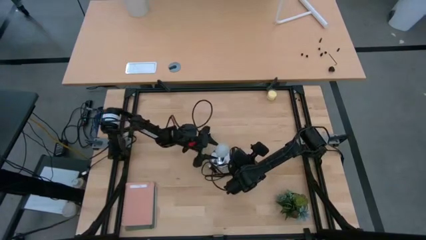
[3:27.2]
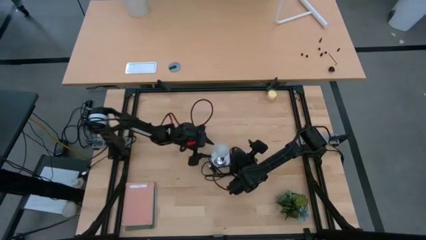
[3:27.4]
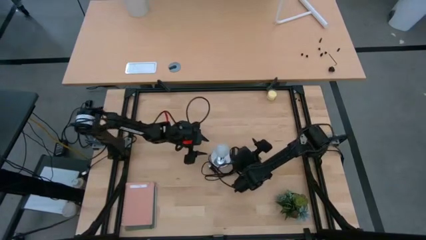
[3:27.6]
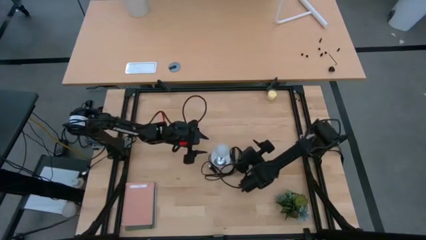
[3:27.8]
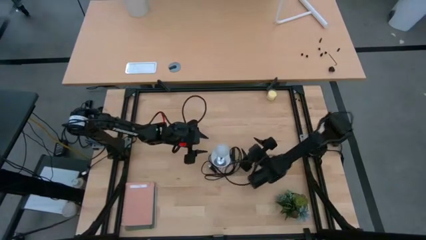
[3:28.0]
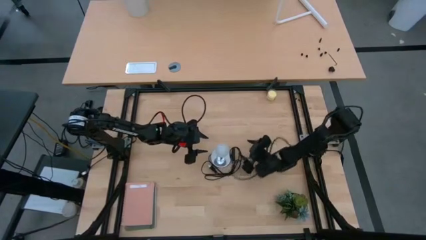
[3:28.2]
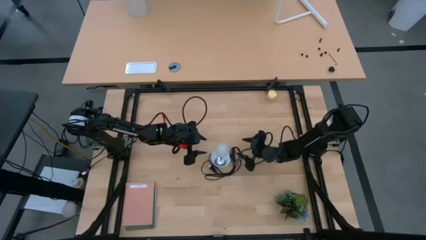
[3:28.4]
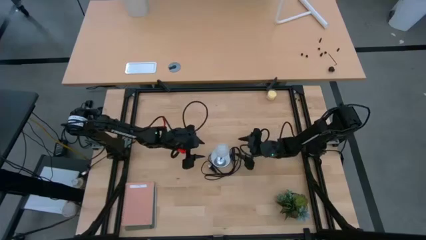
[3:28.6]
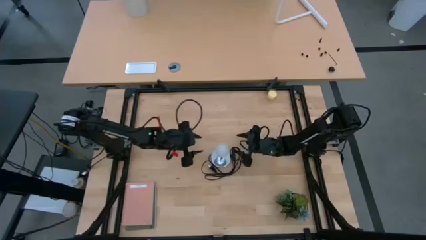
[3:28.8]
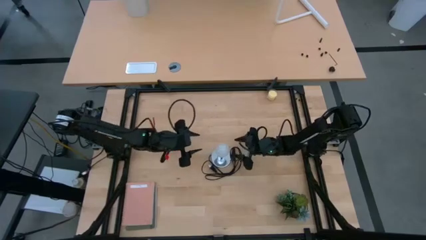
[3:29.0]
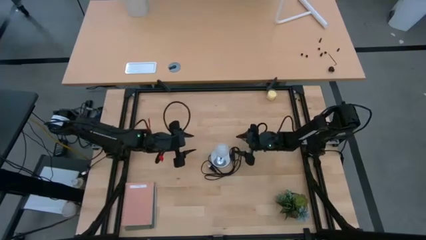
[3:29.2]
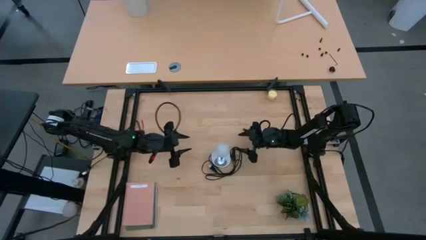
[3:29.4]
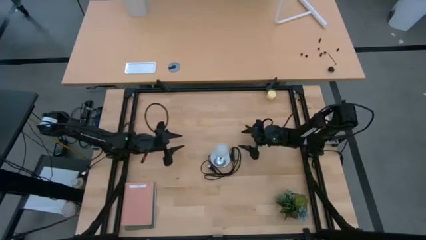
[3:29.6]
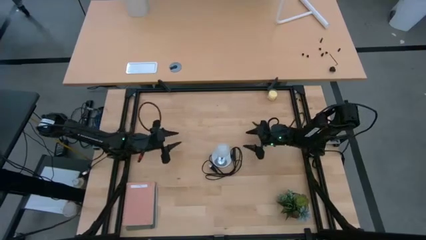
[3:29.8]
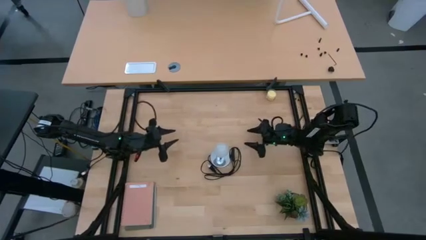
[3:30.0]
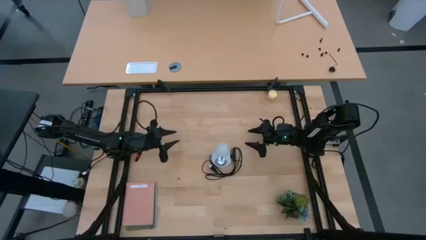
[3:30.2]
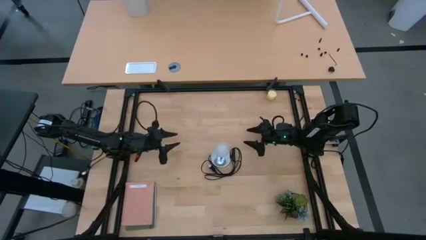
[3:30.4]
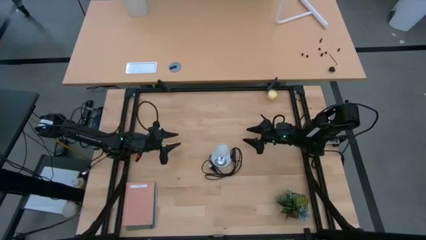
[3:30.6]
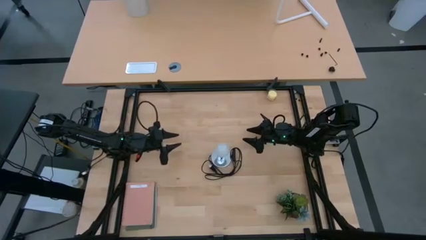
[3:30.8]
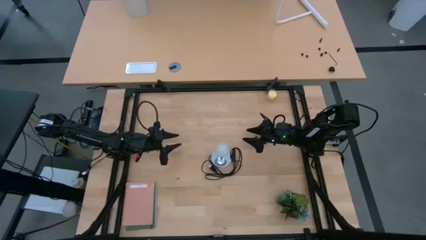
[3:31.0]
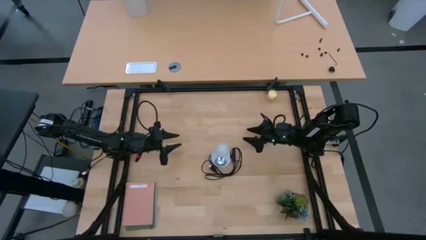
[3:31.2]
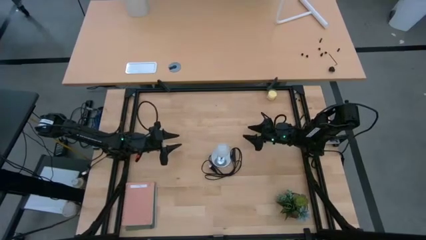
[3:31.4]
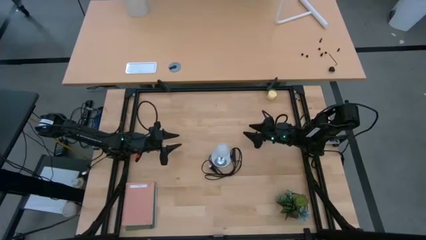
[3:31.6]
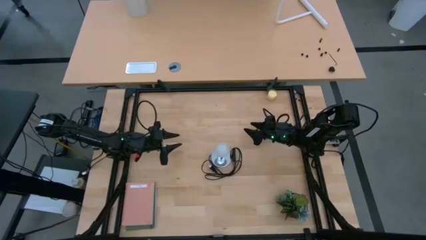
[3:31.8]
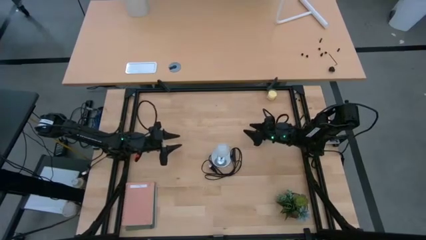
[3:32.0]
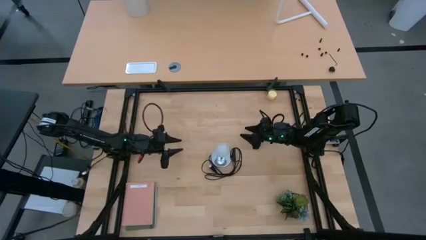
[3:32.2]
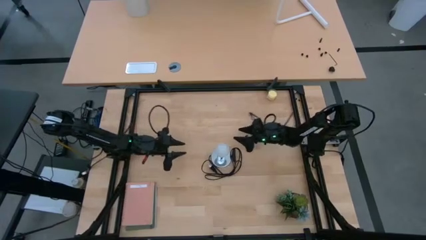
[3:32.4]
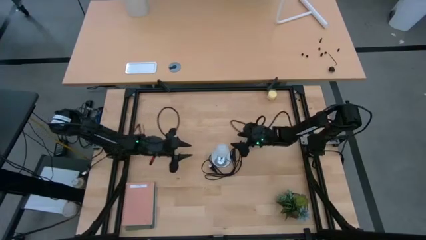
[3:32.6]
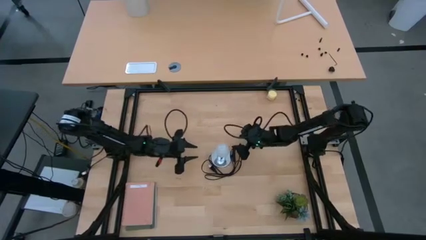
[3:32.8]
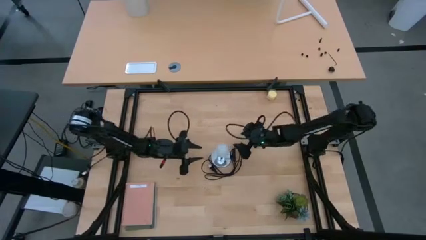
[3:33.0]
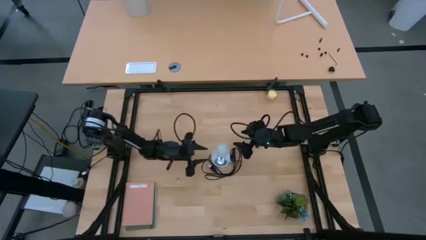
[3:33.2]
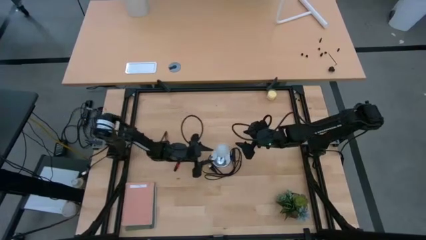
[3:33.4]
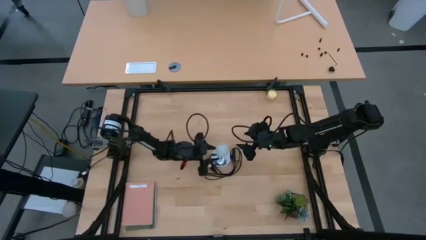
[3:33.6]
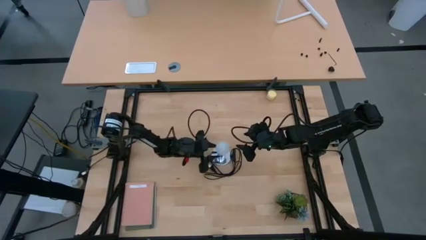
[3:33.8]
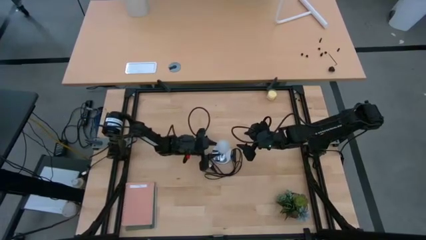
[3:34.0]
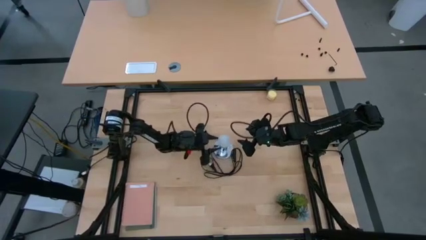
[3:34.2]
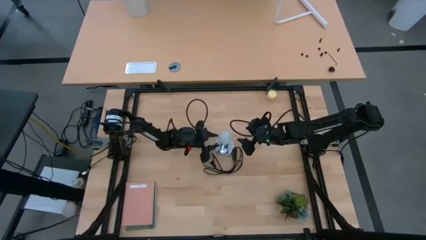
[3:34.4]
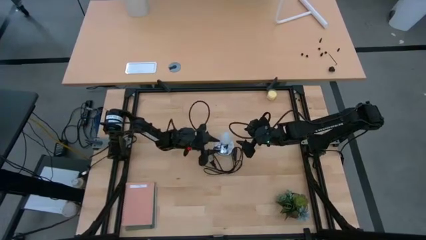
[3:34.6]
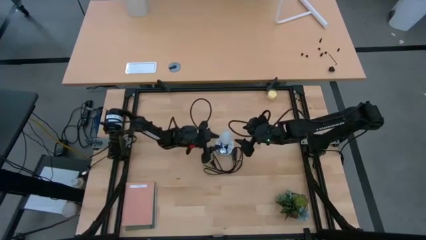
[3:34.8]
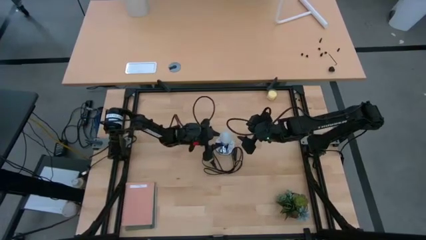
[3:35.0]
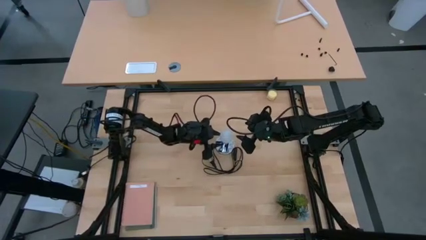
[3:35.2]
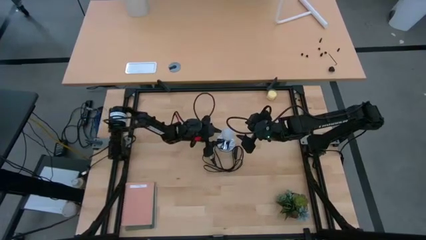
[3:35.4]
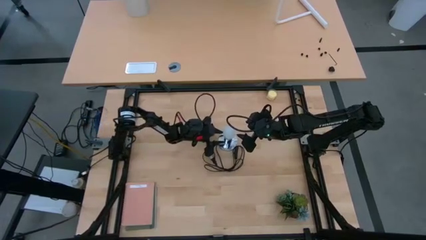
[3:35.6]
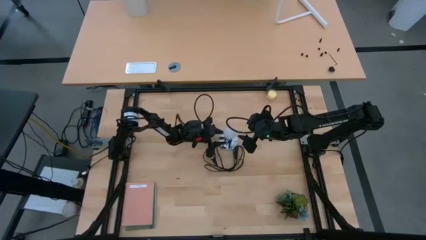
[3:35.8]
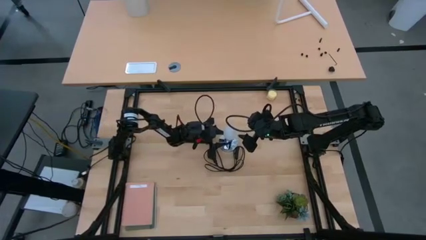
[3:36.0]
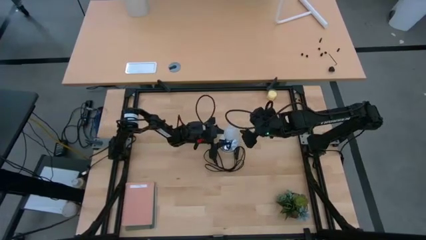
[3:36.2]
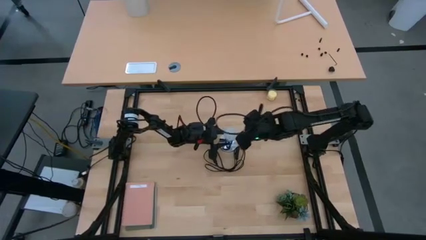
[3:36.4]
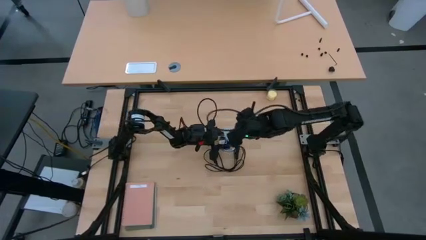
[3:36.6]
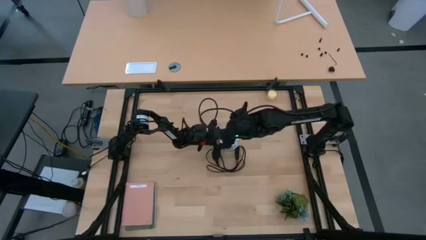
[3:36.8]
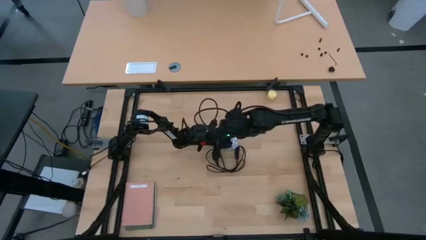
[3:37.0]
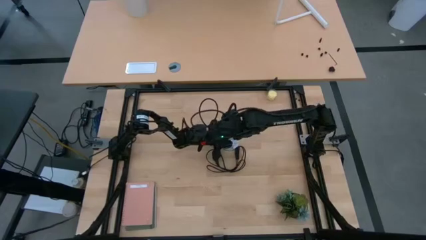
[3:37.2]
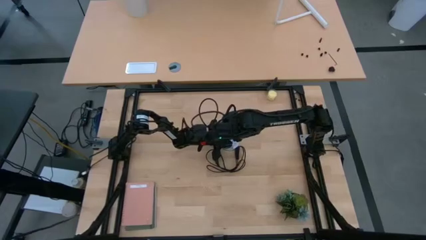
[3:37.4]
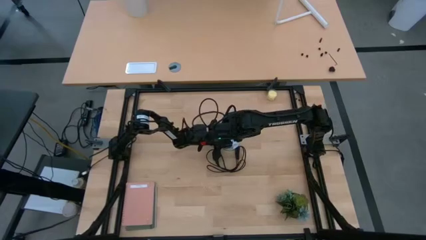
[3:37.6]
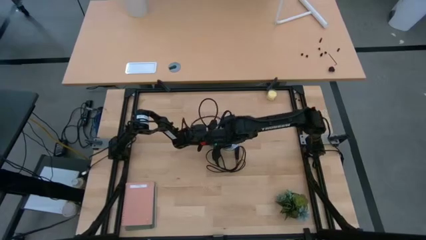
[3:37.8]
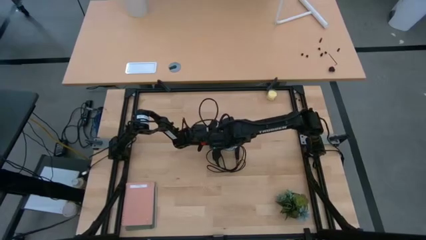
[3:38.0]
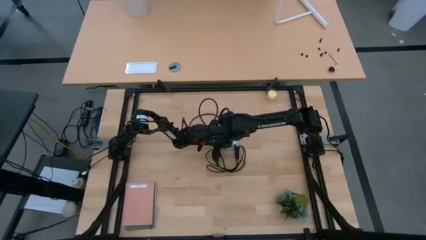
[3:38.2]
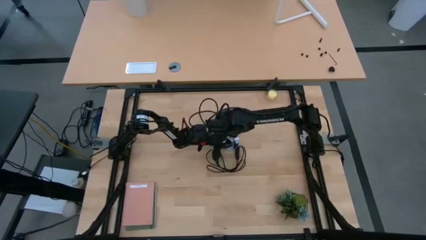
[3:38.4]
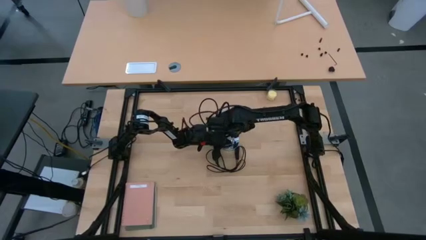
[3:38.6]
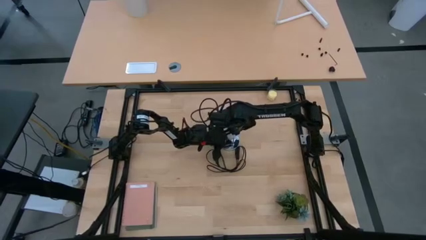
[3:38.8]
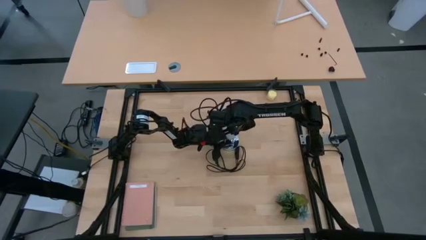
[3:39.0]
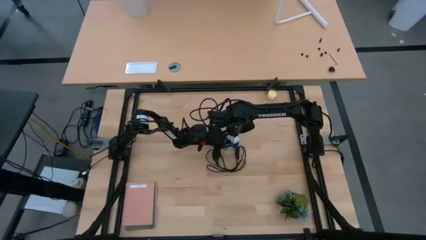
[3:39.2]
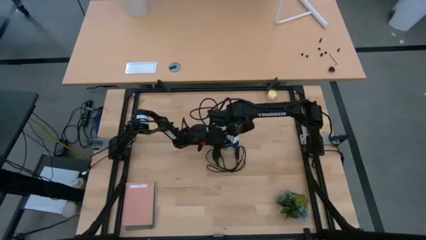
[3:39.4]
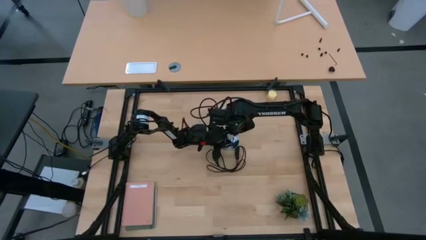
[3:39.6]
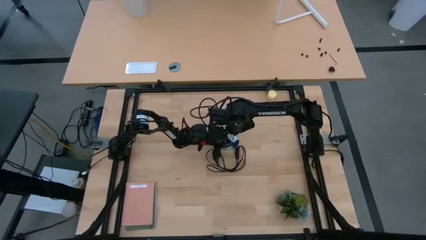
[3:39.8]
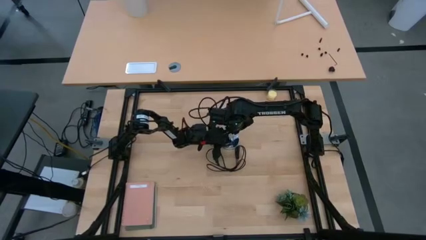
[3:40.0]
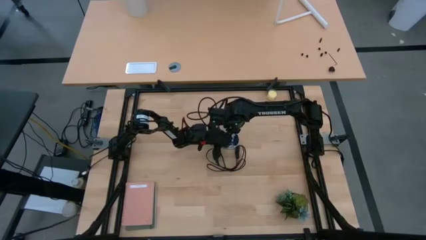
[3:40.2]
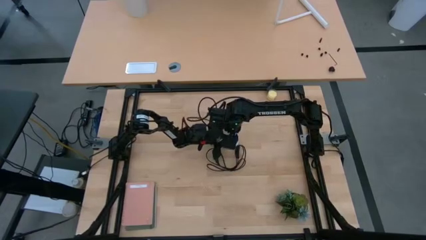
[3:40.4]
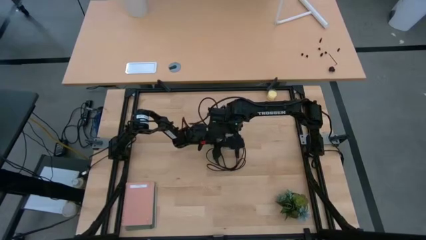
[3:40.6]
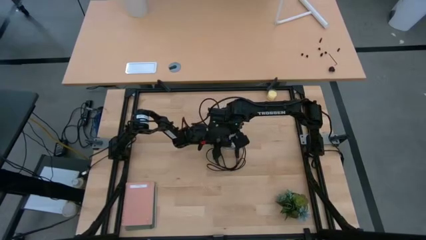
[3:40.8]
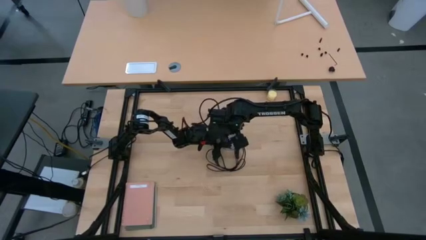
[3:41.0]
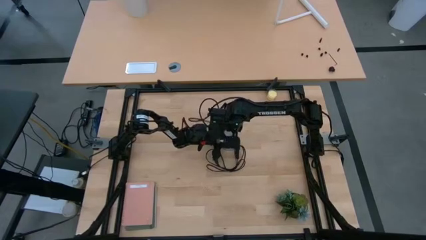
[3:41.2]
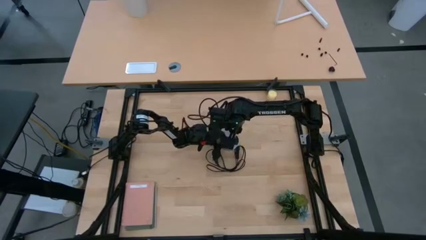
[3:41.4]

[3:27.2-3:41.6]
Task: Screw lightbulb
Remove the white lightbulb from the silver lamp

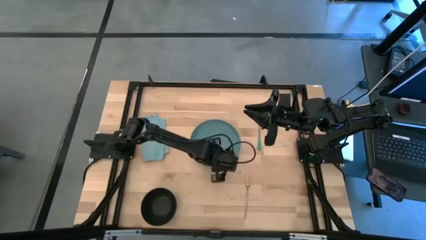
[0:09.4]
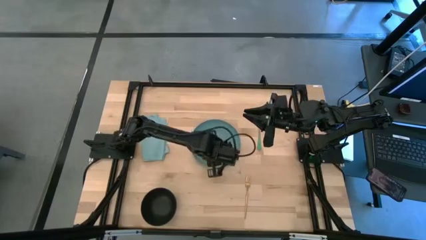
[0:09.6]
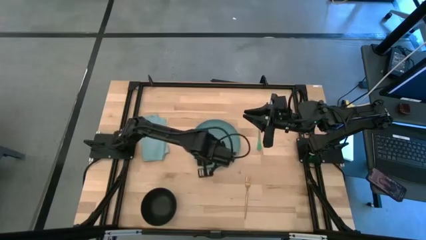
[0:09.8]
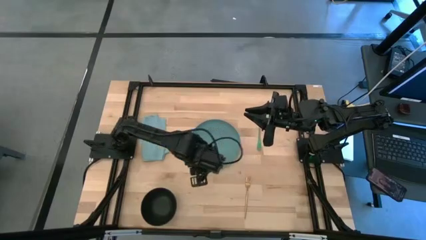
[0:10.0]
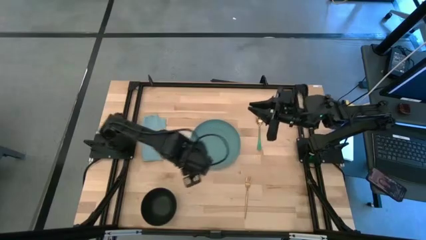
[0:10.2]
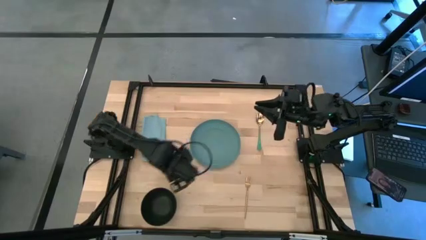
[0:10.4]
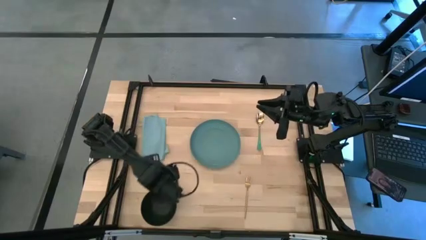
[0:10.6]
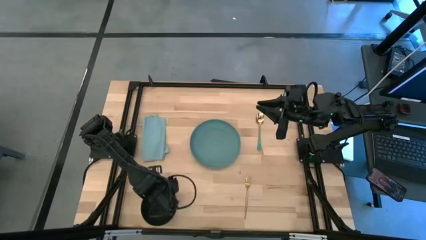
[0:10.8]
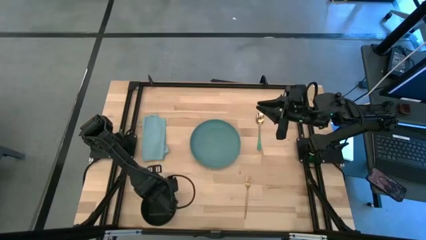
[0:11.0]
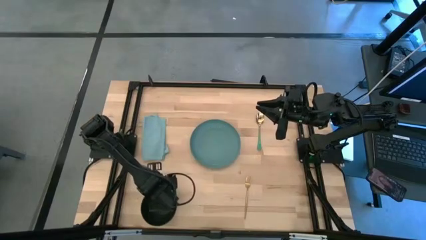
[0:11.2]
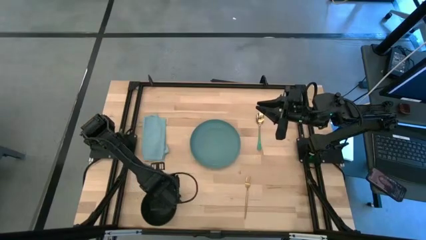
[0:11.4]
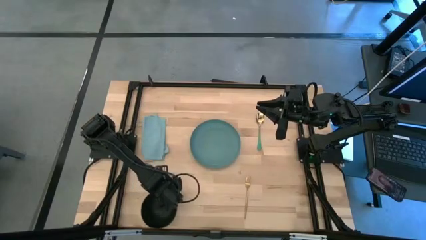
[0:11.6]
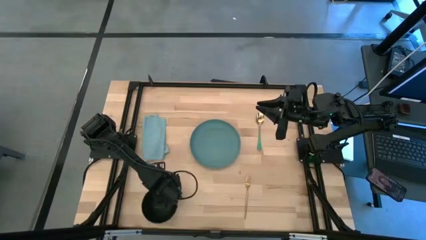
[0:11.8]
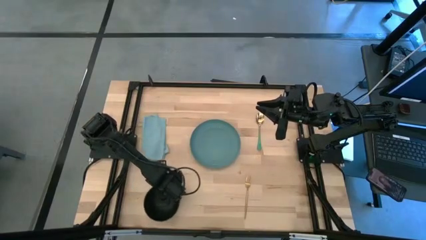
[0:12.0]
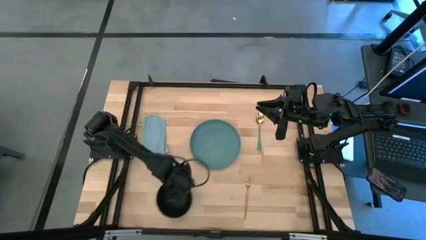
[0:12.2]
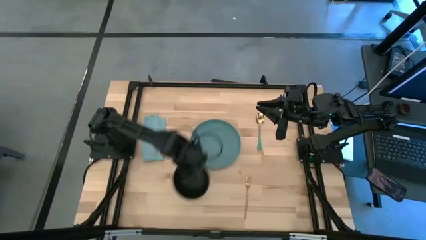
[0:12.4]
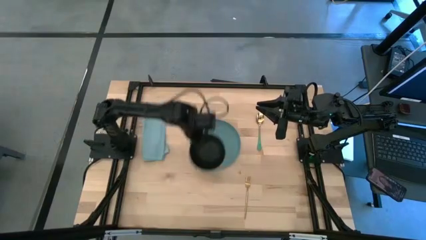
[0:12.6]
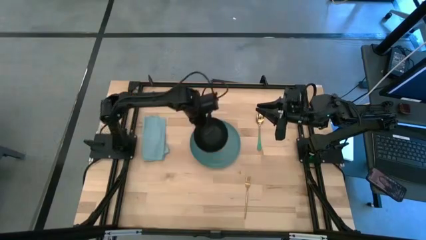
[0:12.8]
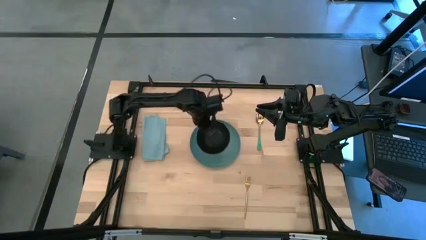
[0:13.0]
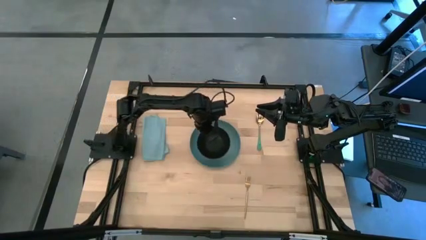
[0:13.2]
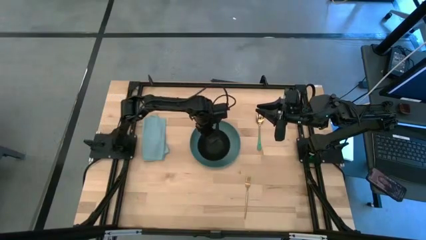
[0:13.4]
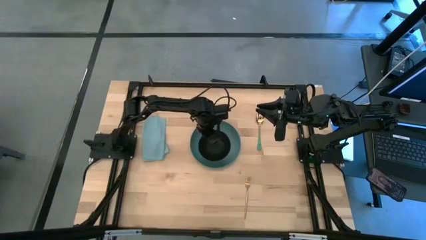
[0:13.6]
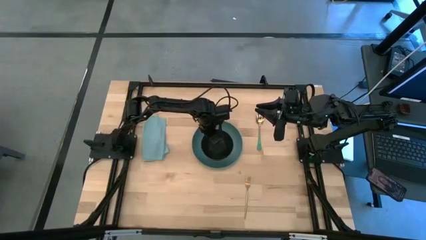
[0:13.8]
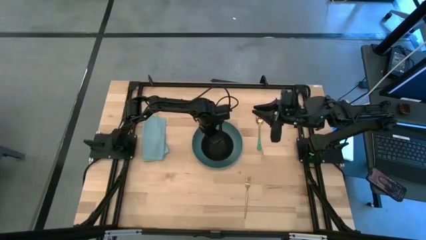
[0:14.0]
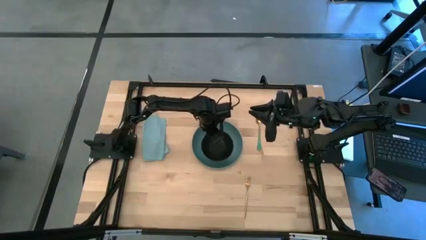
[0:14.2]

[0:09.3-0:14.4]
Task: Set table place
Stack the black bowl on the green plate
